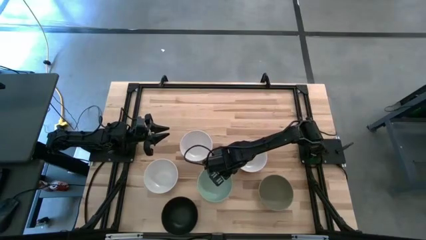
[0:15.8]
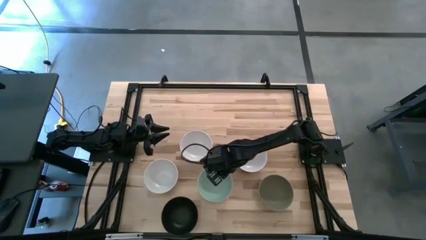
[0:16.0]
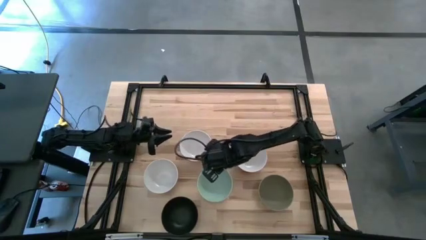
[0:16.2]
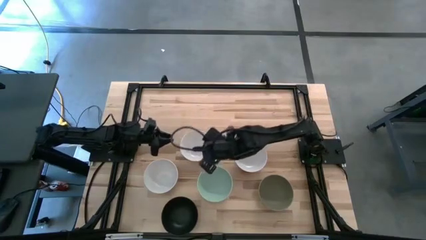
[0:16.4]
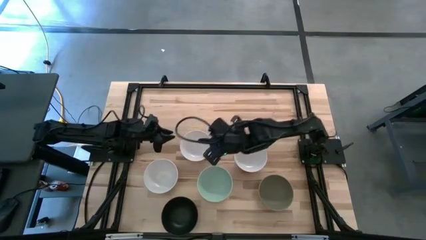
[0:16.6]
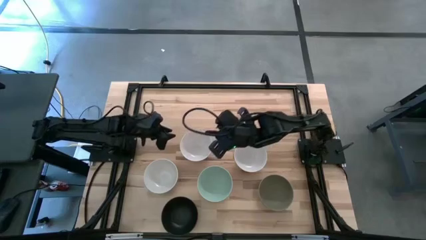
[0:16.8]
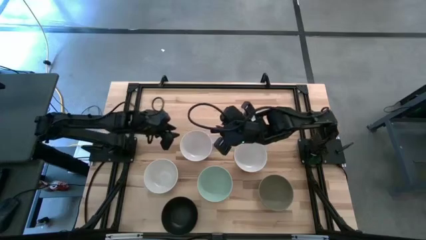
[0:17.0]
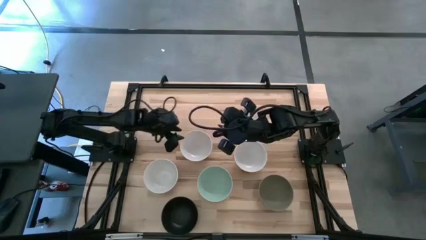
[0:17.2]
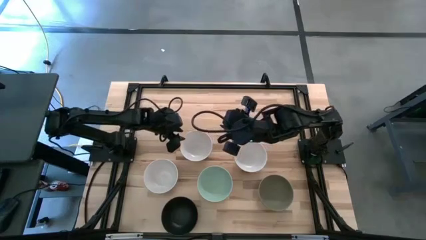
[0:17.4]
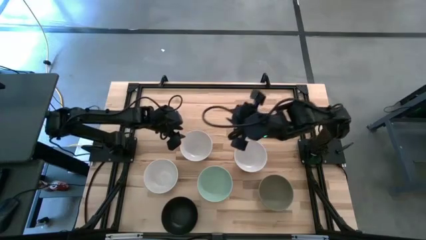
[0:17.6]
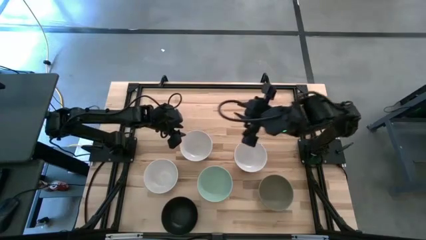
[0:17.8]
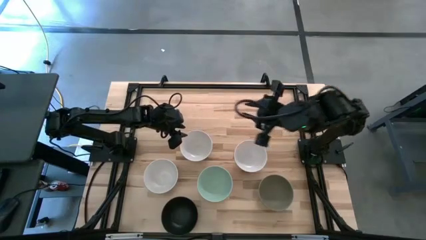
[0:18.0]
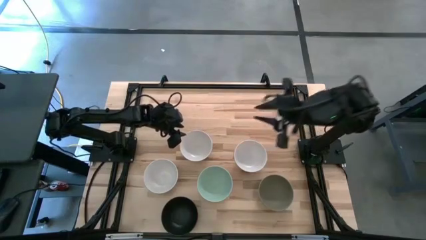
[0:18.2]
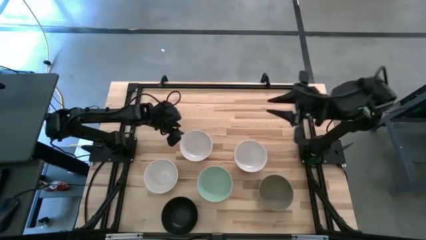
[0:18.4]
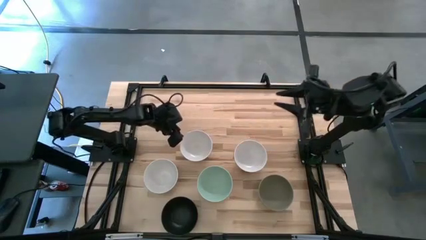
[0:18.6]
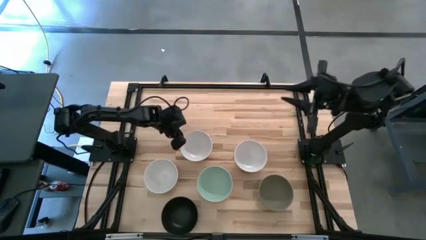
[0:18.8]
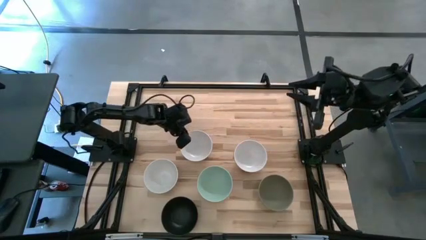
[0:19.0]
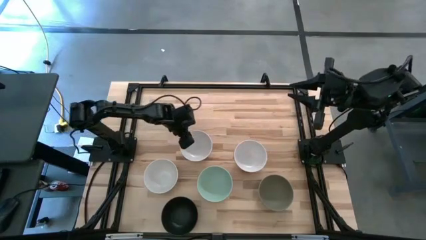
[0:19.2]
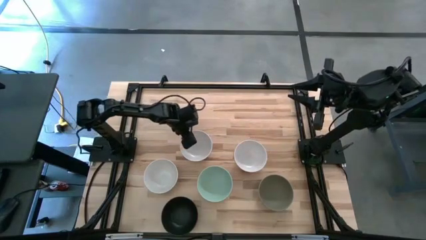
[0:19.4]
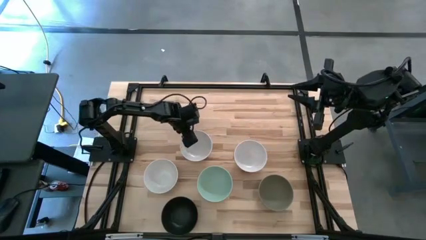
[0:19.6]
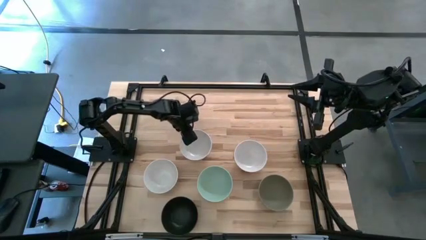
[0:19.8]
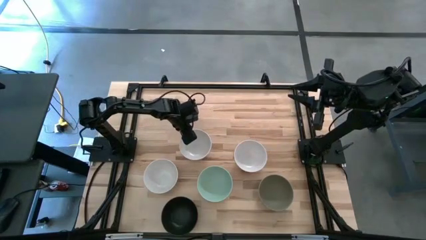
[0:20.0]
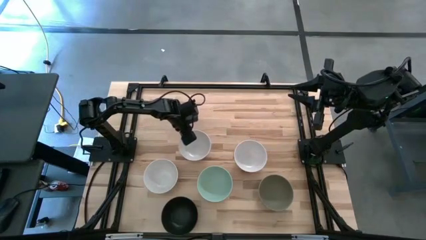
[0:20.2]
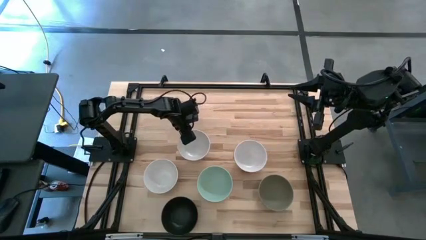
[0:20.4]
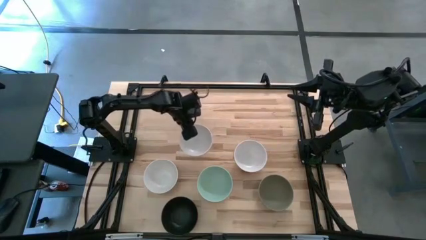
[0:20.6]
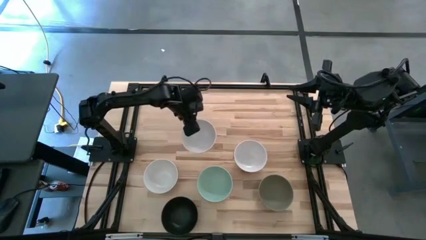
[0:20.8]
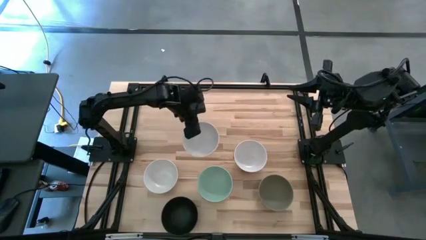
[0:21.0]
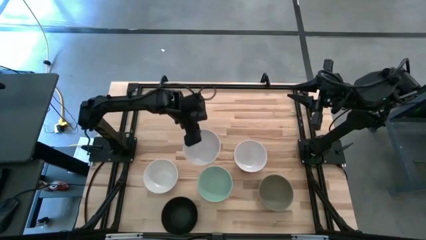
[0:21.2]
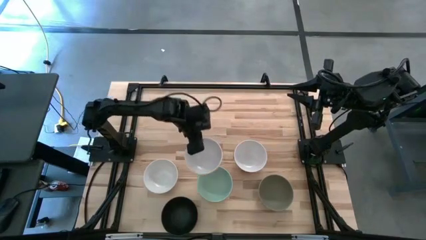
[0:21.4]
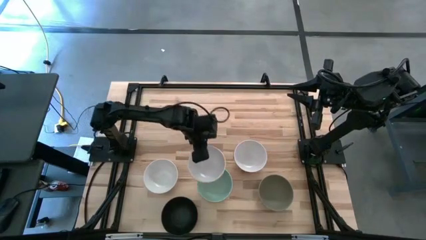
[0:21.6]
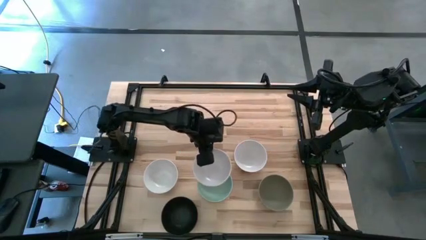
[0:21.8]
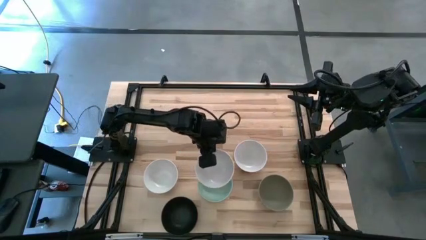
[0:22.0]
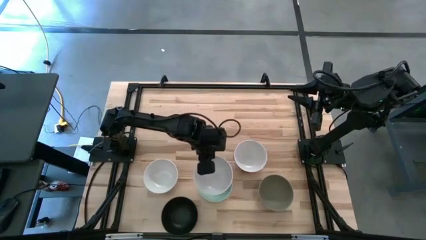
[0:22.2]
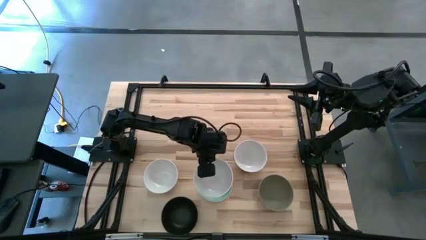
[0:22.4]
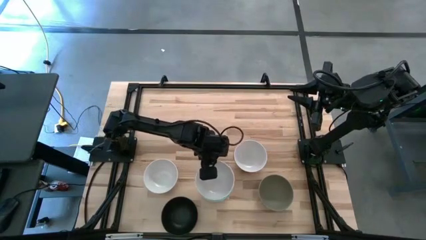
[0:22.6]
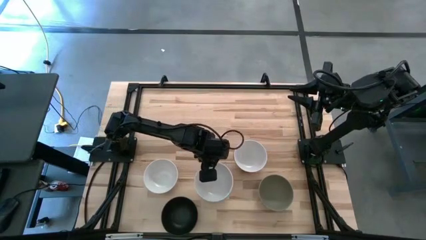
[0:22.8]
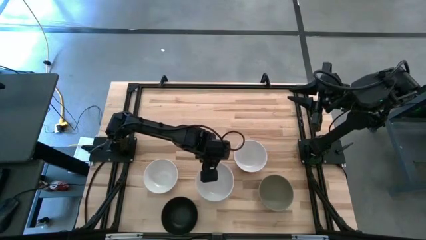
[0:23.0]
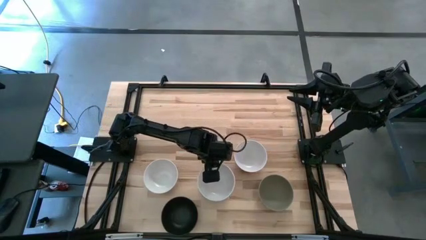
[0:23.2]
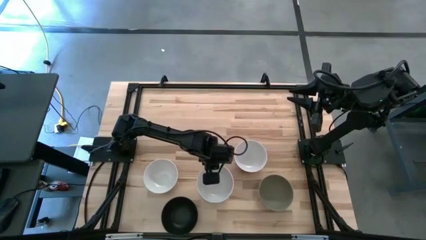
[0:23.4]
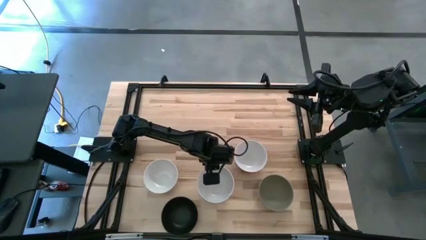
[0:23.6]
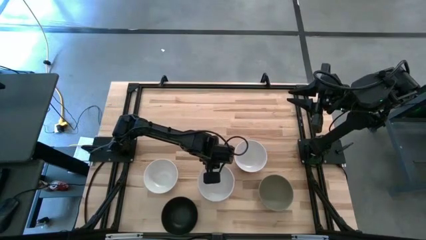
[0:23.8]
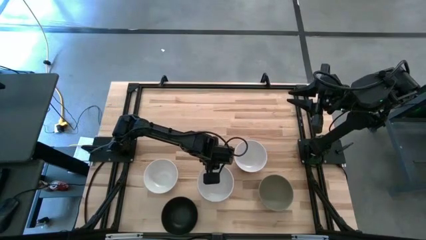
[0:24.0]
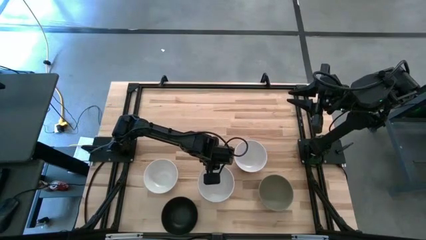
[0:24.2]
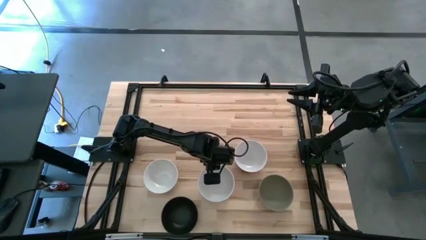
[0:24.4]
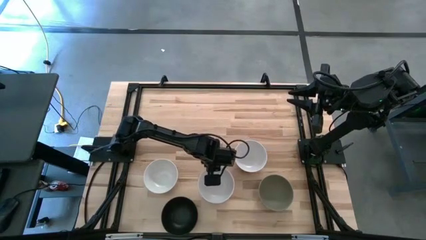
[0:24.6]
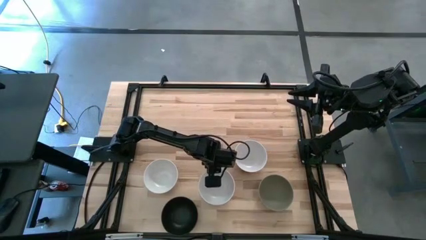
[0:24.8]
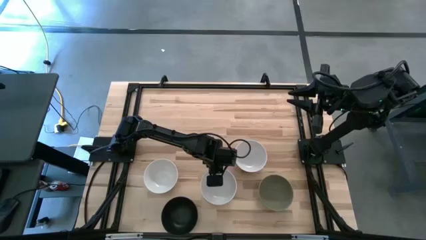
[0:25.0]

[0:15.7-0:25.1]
Task: Nest bowls inside each other
Stack the middle white bowl on top of the green bowl

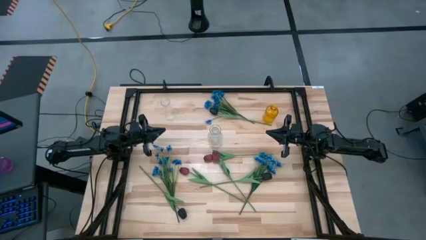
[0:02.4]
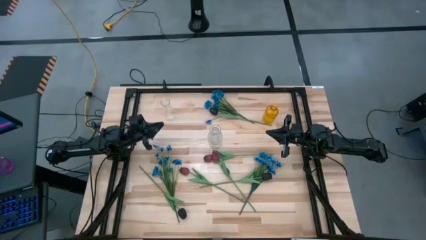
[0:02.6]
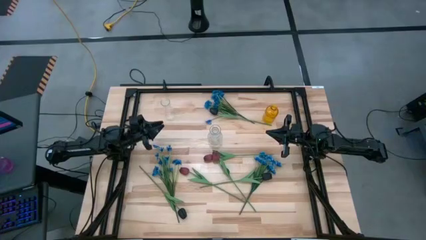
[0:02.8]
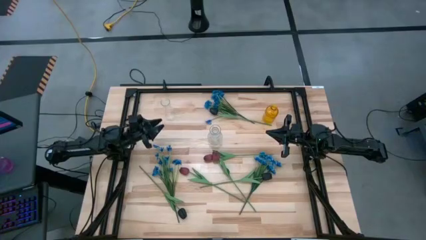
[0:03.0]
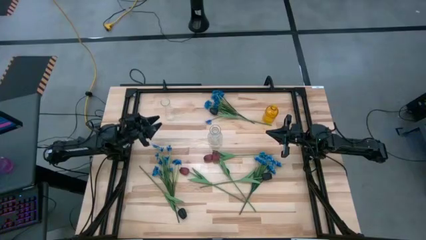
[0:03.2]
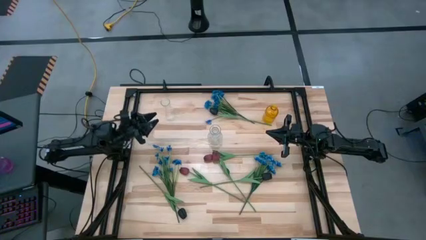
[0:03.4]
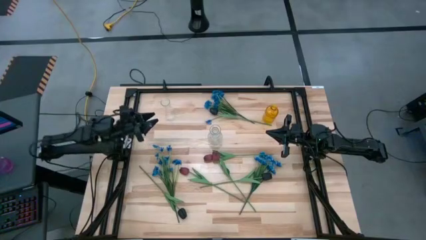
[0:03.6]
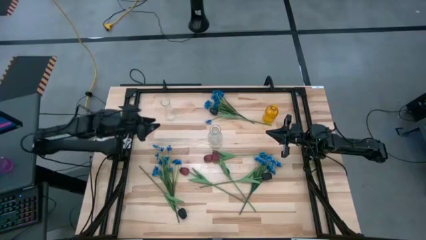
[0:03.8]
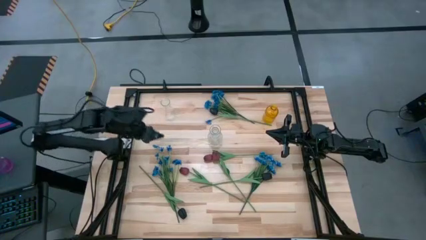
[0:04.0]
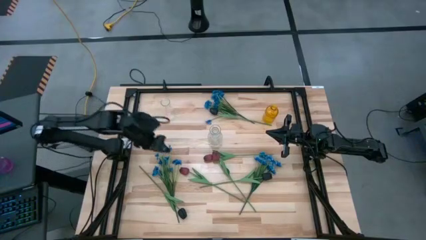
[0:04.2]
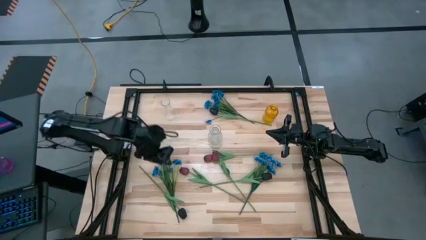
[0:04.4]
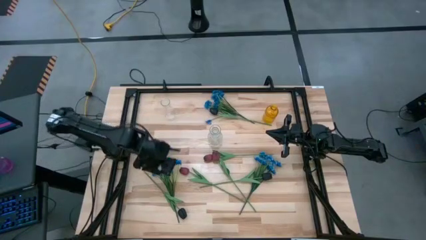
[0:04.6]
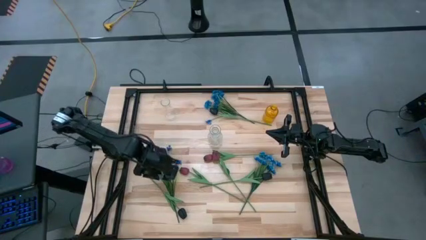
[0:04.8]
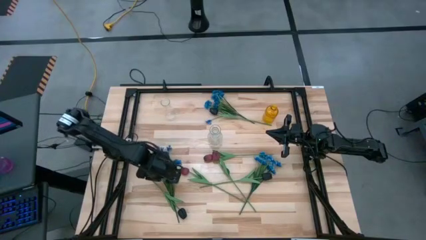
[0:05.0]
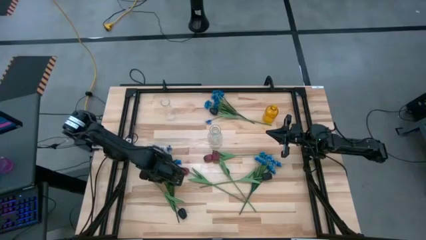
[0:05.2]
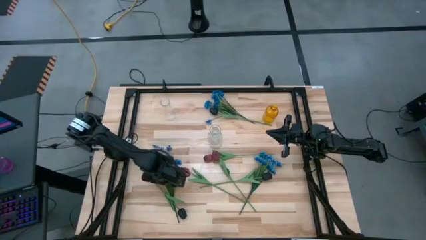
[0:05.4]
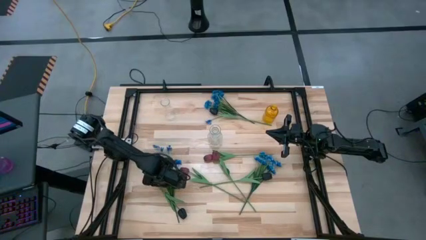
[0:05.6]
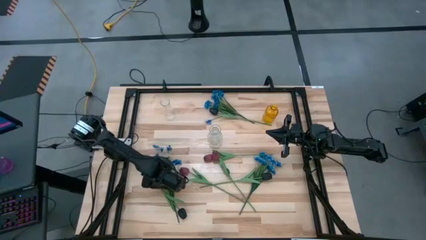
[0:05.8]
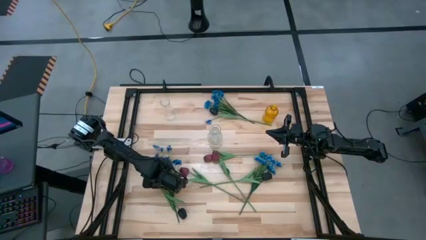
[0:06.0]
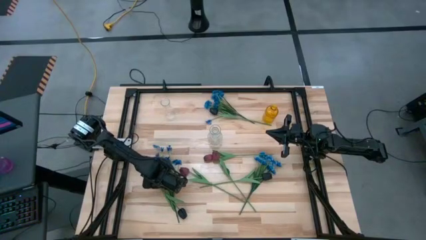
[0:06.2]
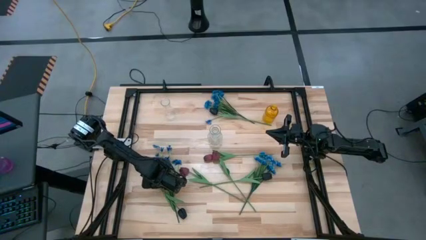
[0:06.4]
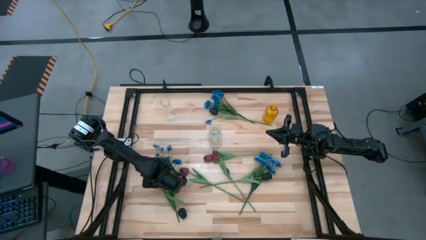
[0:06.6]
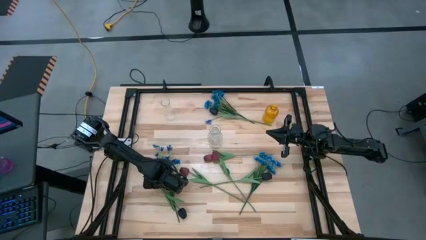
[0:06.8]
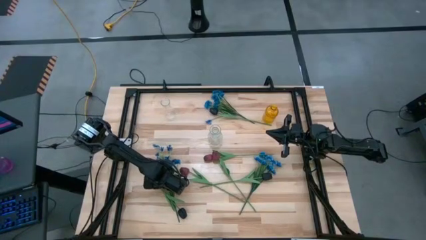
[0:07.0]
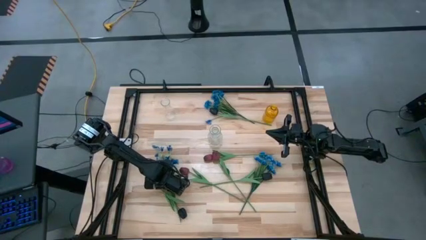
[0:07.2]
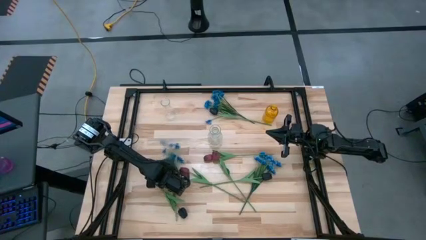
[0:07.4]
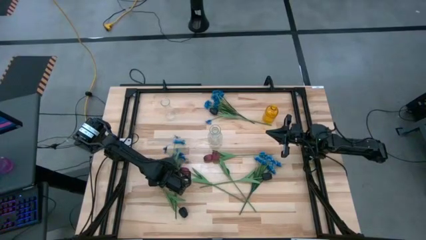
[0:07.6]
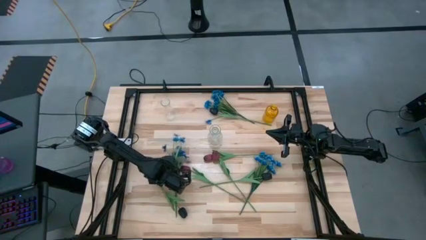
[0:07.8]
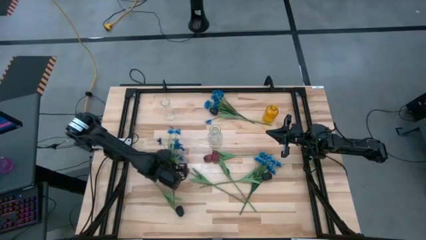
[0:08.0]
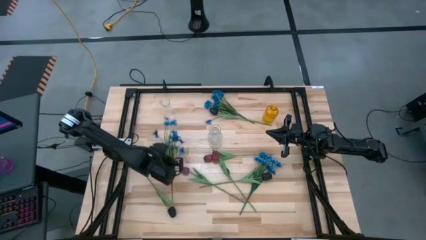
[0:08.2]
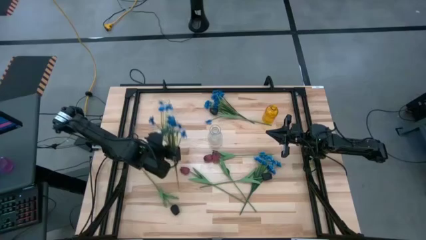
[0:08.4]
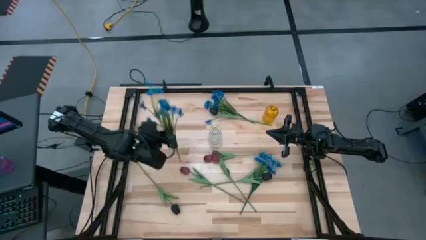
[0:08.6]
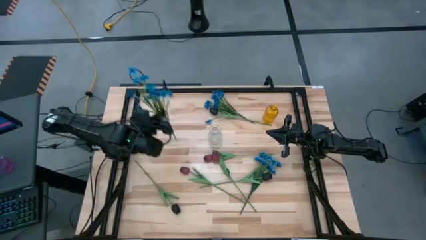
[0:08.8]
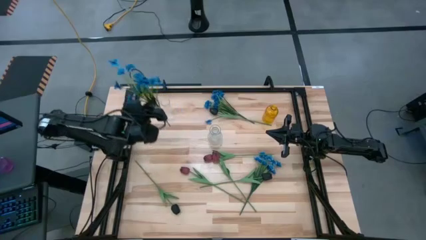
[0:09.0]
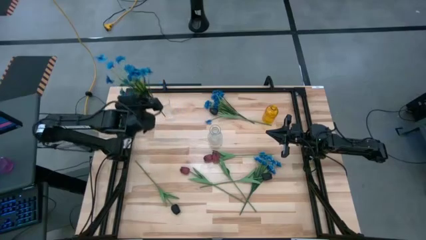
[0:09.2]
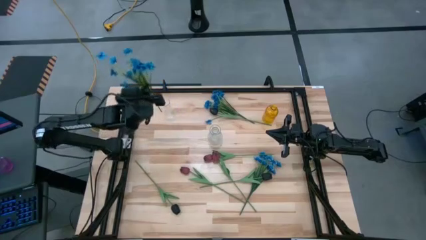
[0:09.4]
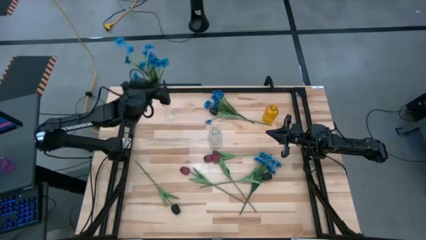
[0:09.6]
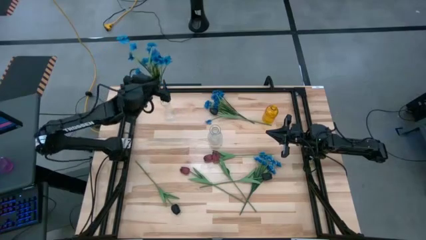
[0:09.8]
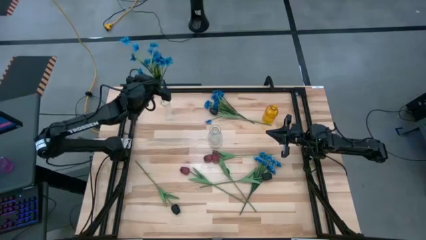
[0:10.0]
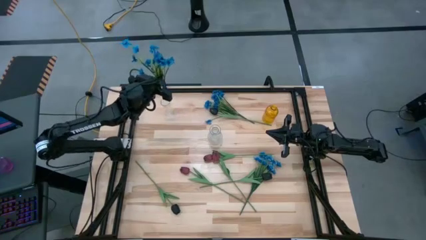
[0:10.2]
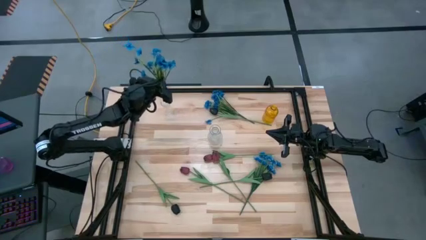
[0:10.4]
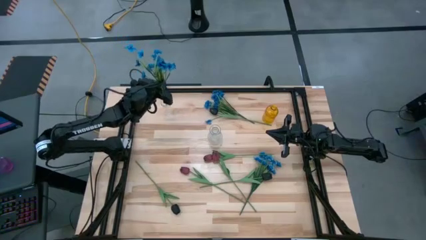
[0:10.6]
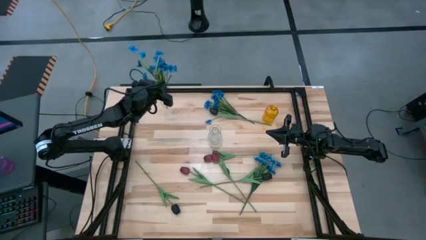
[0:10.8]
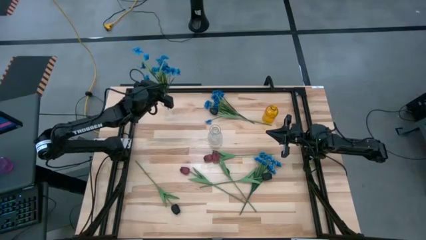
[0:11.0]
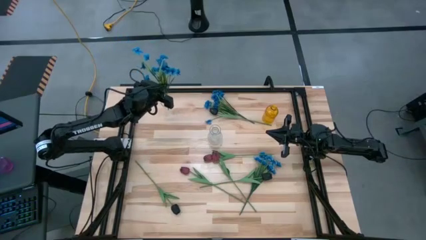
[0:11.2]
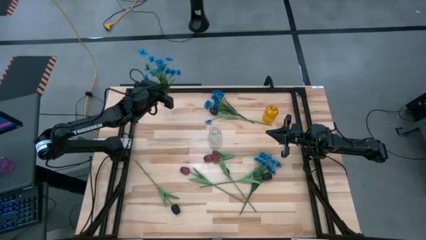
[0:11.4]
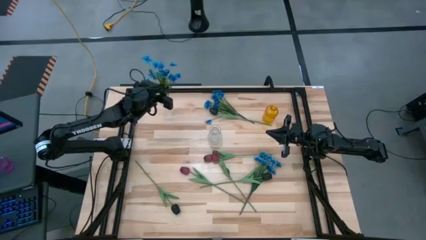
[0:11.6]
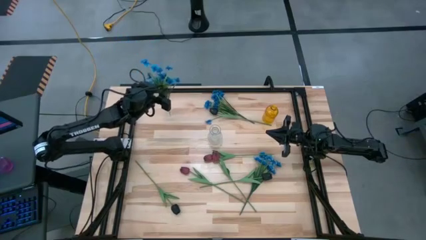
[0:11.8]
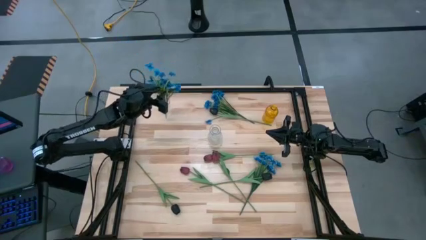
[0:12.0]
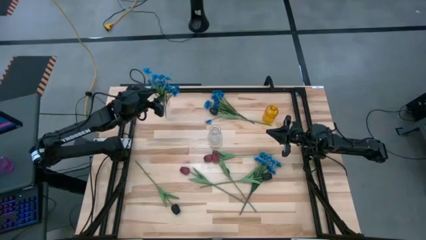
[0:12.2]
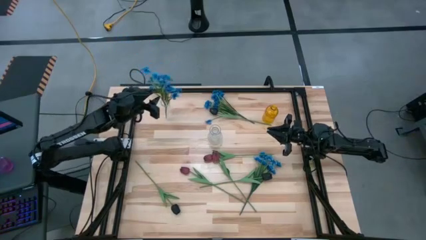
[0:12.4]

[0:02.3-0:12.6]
Task: Sort flowers into vase by color
Put the bottom left blue flower into the top transparent vase
